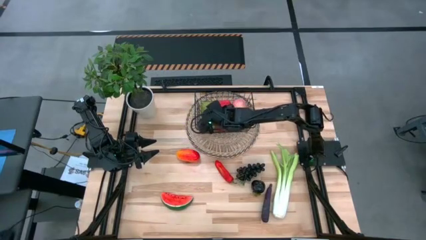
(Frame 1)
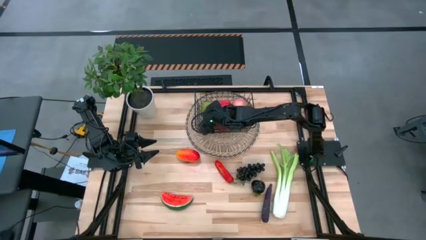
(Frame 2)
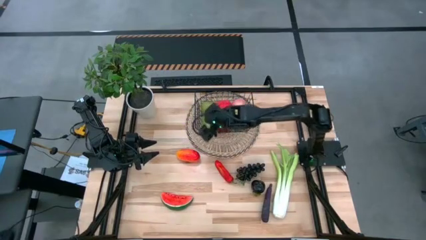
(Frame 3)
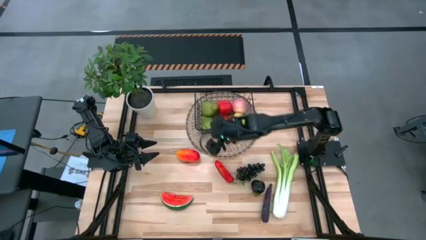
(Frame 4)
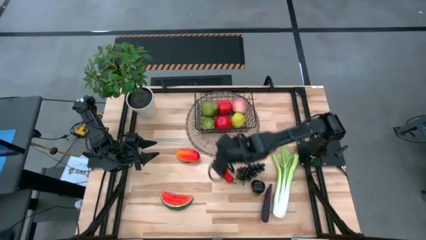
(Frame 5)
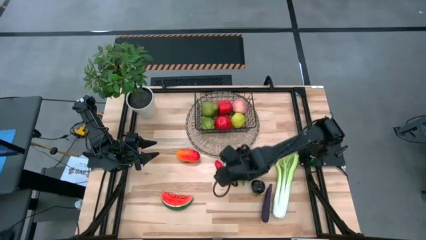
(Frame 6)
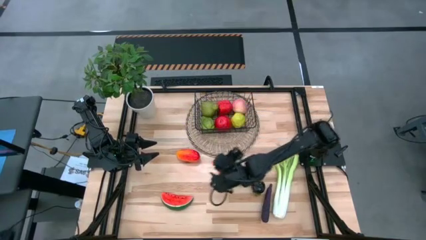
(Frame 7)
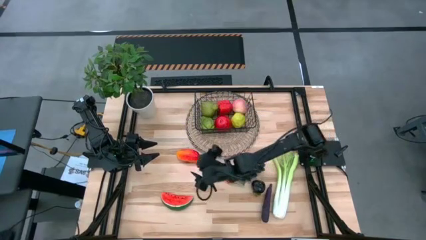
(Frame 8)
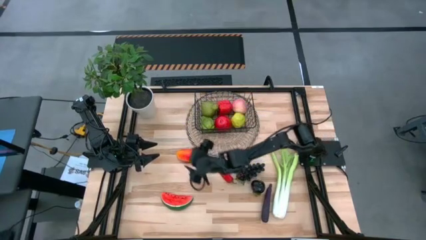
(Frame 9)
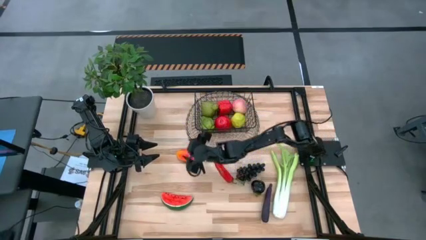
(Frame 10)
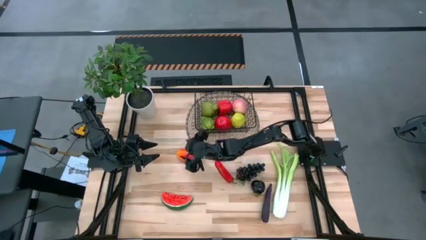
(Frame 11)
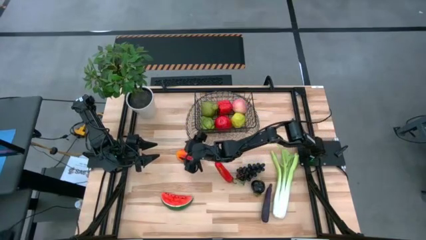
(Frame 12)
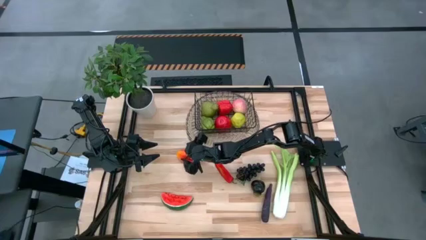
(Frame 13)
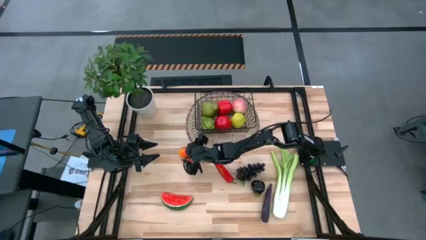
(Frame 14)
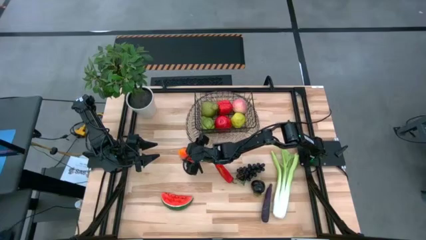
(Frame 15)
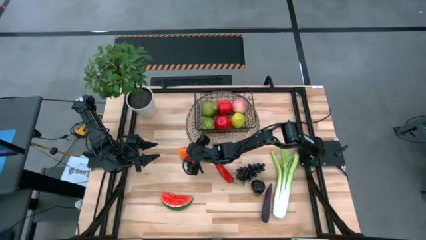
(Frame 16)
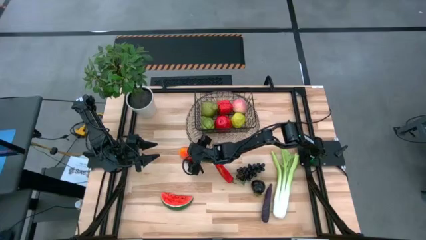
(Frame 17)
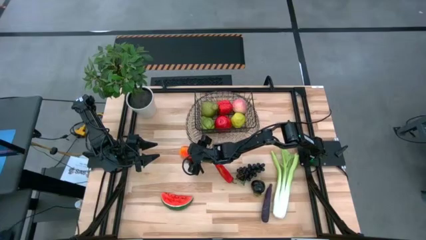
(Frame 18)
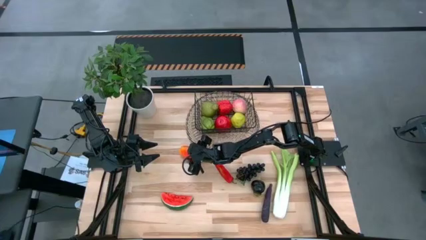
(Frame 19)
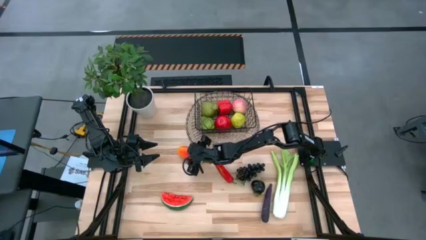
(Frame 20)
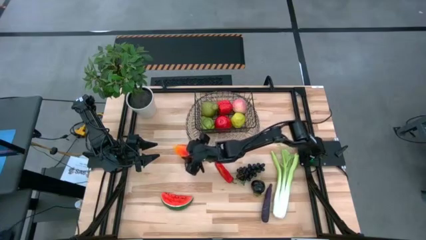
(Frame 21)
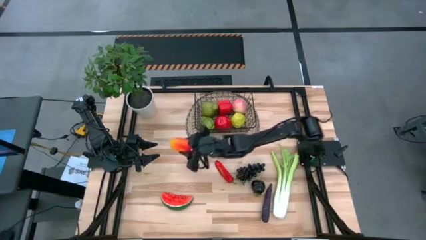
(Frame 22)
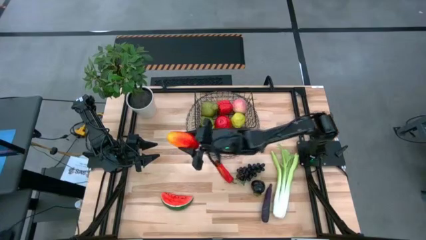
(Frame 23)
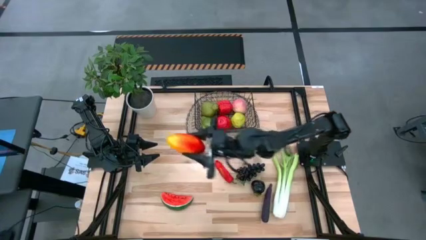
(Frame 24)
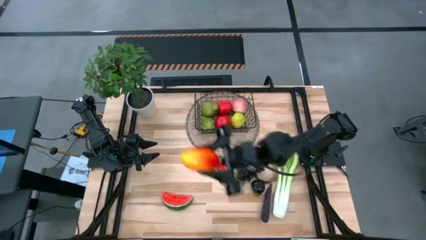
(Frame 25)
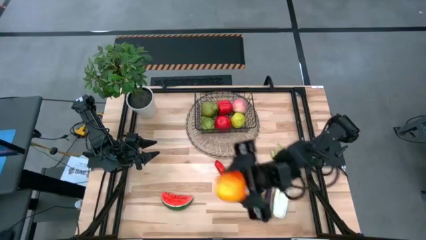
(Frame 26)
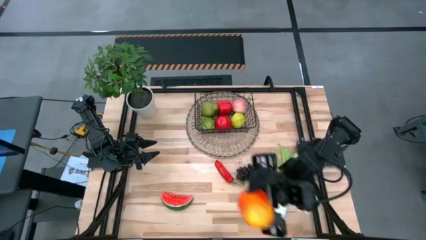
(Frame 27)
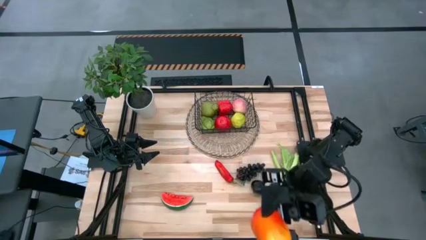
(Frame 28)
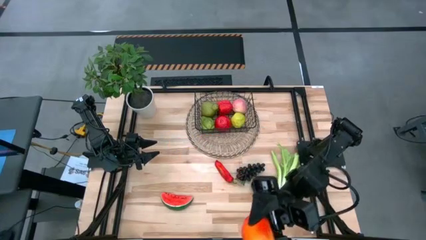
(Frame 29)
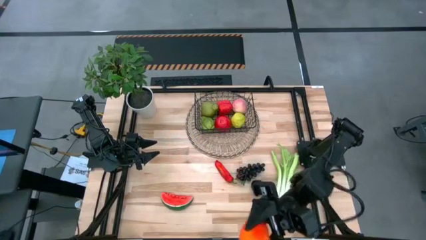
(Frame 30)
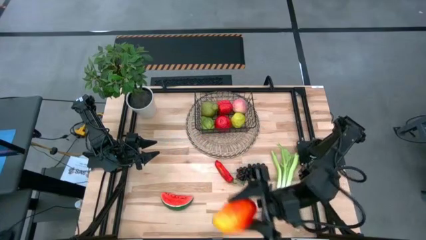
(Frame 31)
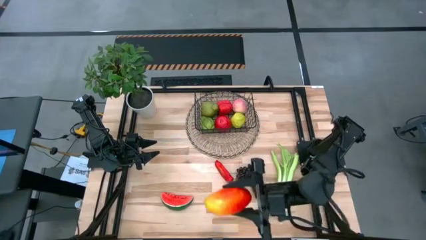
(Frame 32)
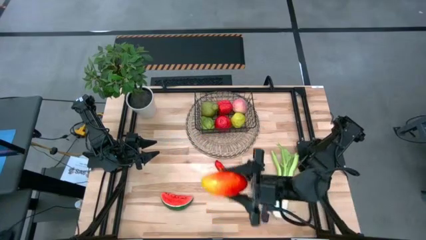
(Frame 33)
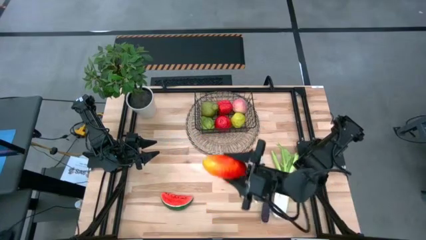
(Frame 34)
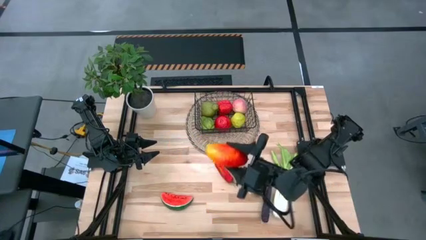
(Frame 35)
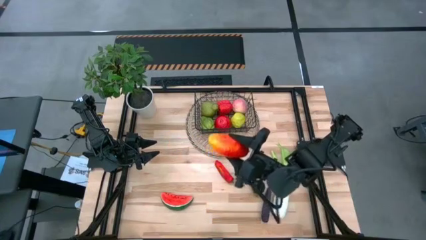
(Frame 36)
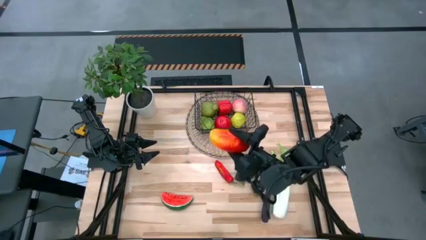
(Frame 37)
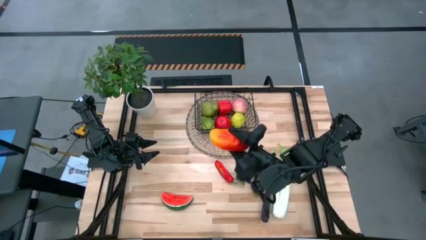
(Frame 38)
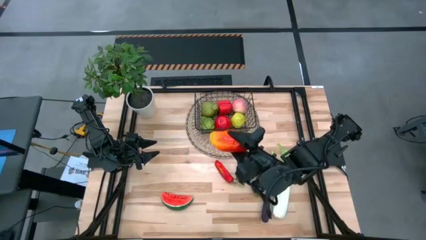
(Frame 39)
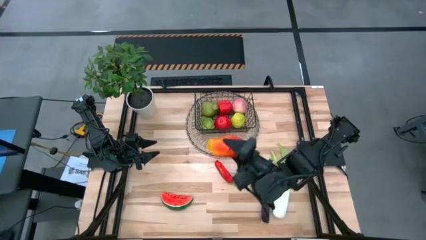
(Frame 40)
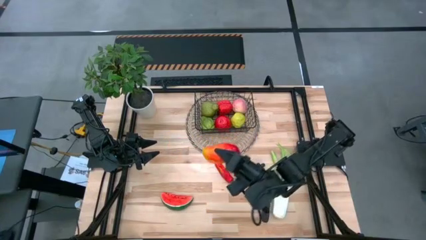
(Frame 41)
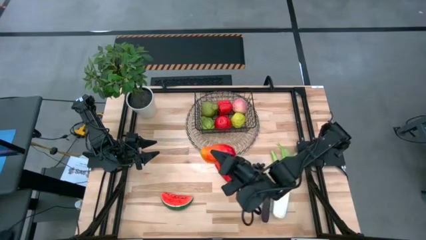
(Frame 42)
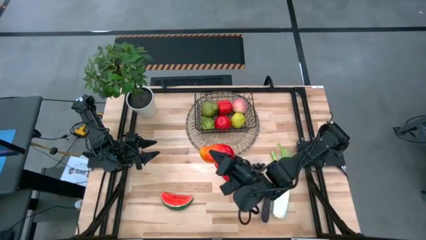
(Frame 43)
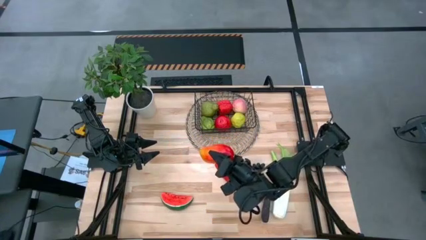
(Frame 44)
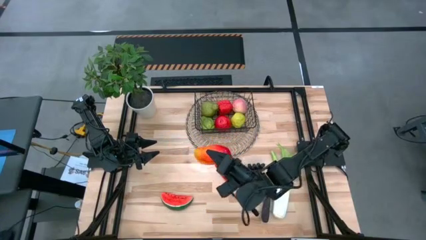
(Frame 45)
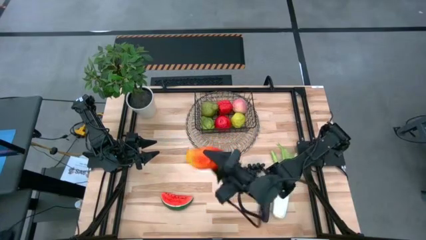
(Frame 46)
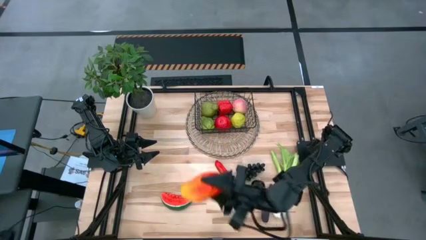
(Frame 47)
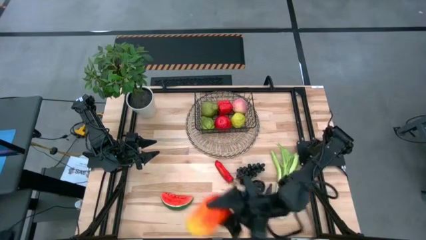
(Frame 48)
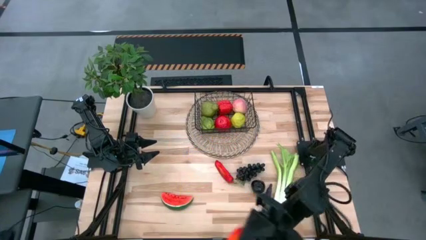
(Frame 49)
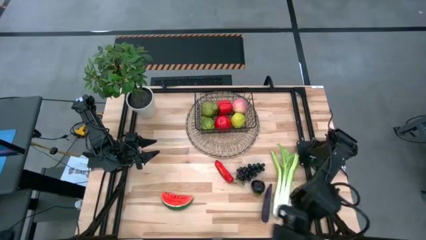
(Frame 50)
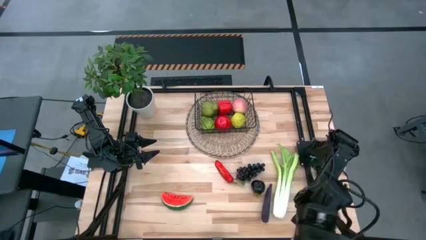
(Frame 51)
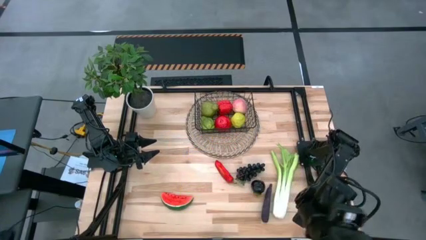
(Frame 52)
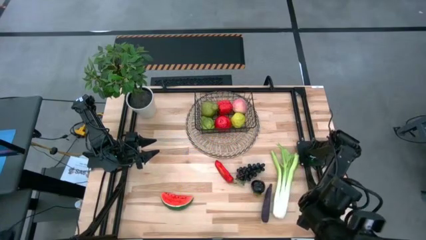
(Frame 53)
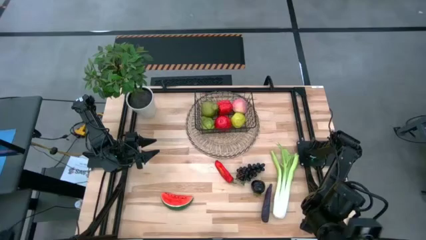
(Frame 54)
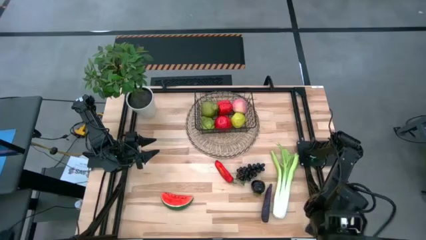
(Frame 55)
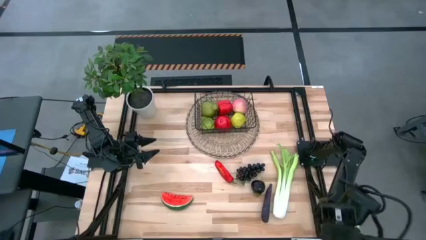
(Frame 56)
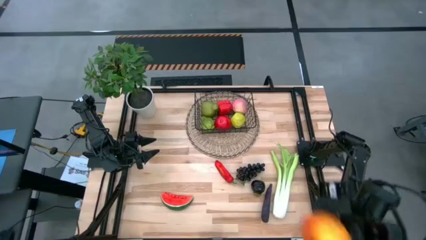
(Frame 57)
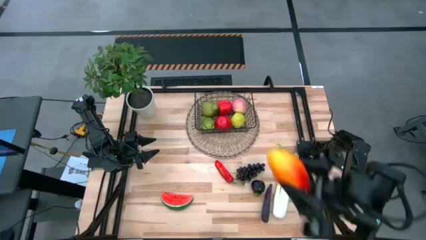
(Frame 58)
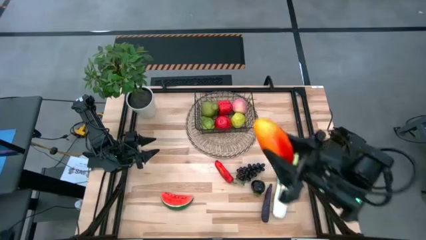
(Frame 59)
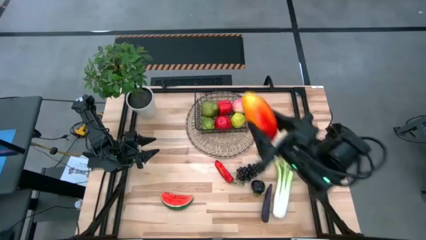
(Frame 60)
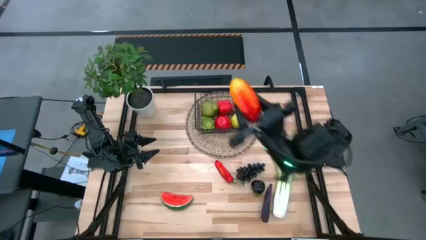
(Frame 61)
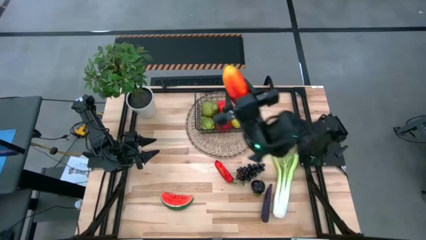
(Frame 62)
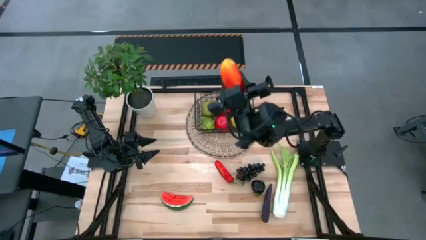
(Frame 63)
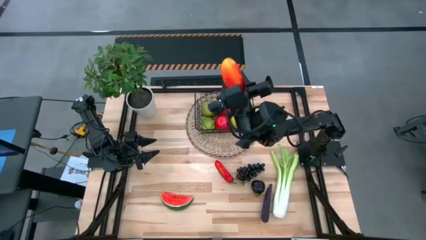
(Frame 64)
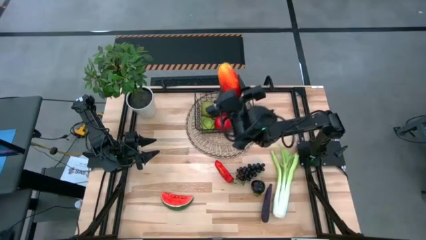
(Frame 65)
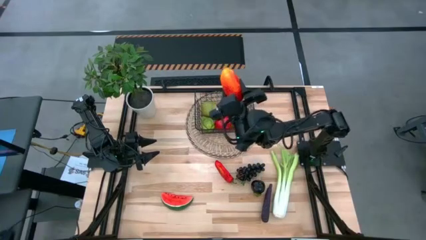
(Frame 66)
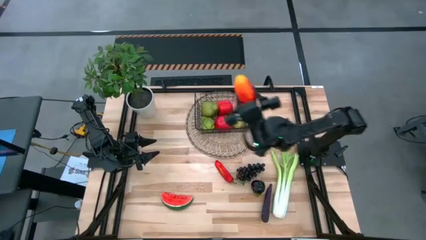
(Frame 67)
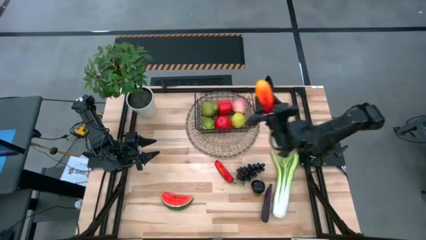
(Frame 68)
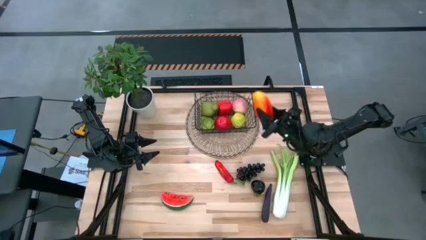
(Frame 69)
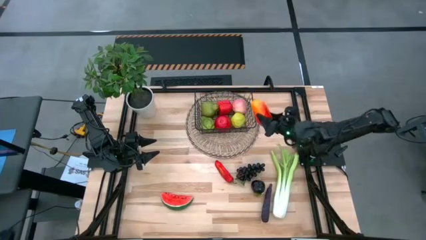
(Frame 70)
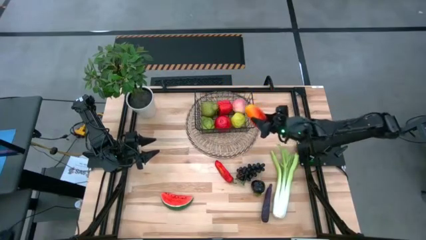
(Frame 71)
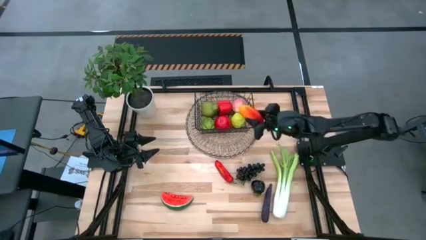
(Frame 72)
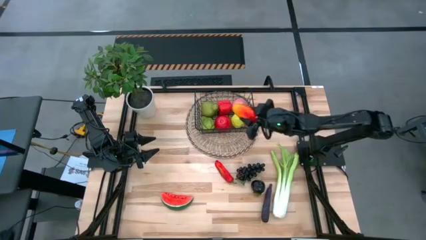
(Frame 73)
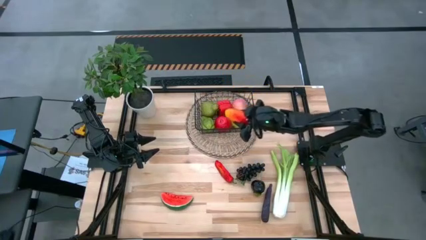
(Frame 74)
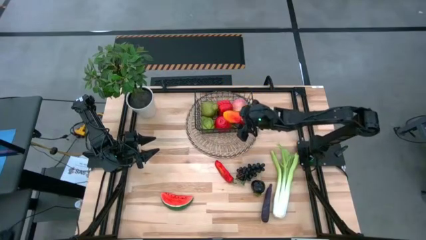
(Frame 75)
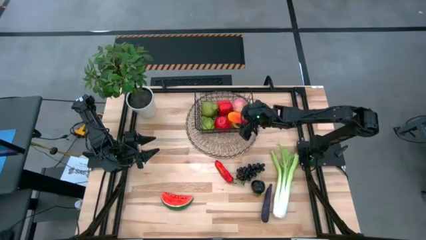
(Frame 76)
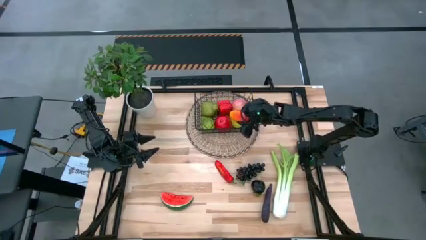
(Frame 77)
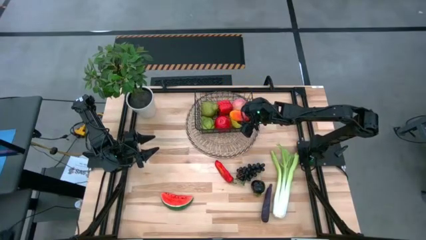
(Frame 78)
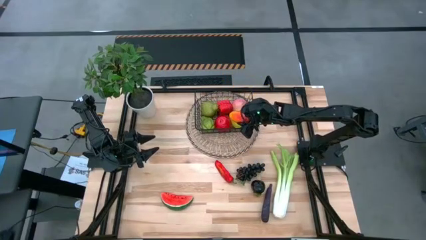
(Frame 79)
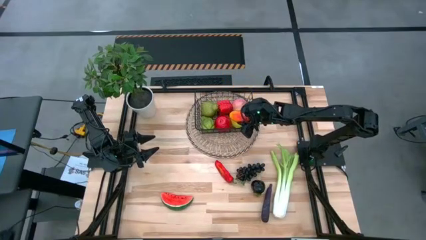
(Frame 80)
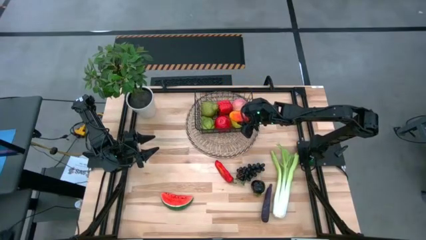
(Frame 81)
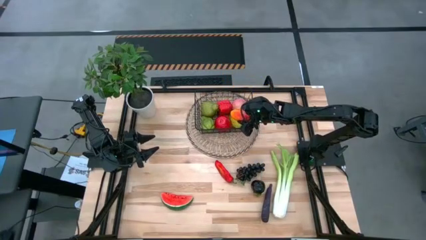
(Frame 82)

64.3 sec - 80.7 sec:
Task: Build produce basket
Put the orange mango into the black wire basket
